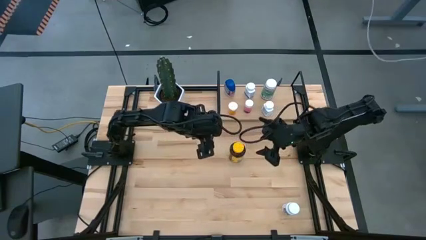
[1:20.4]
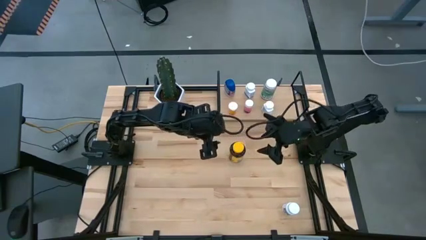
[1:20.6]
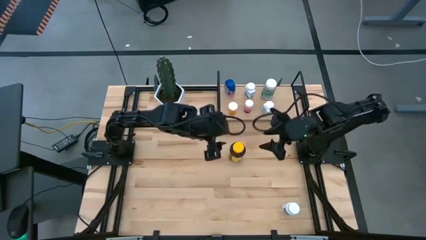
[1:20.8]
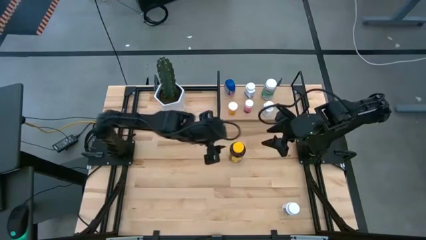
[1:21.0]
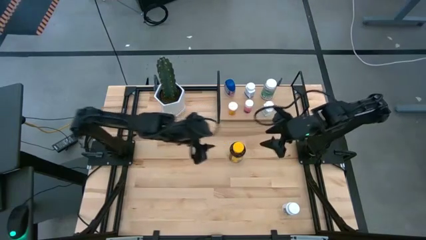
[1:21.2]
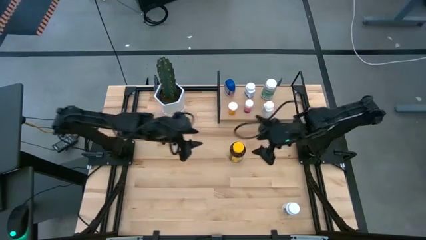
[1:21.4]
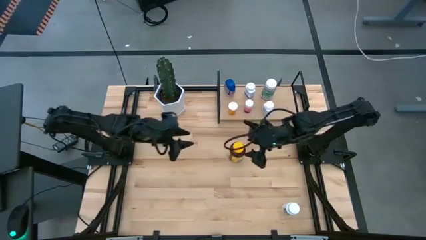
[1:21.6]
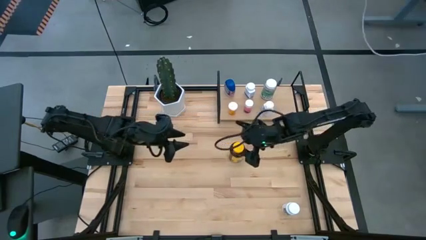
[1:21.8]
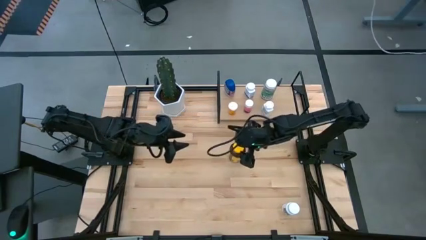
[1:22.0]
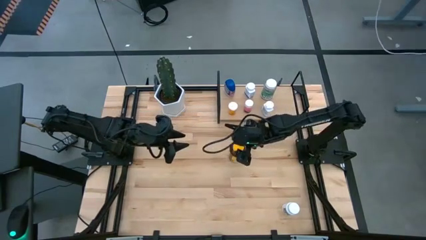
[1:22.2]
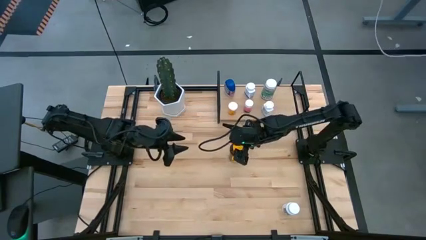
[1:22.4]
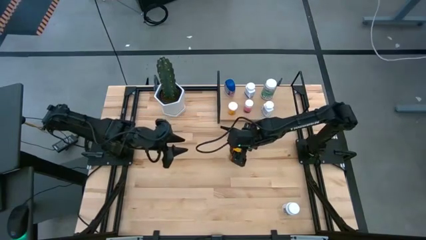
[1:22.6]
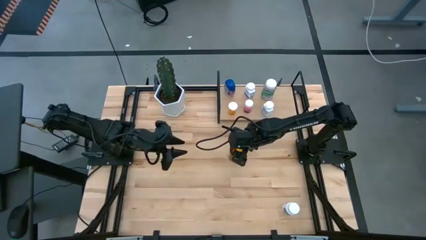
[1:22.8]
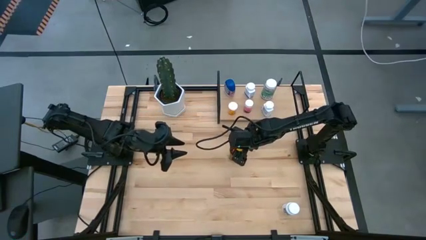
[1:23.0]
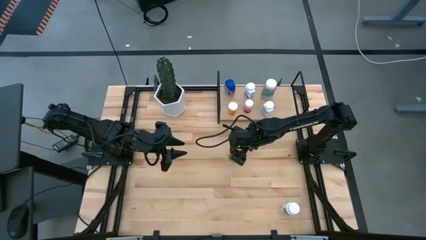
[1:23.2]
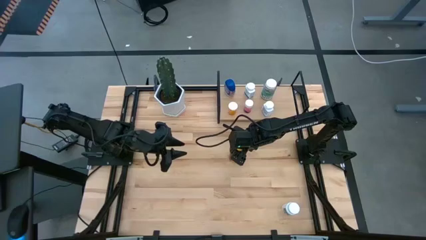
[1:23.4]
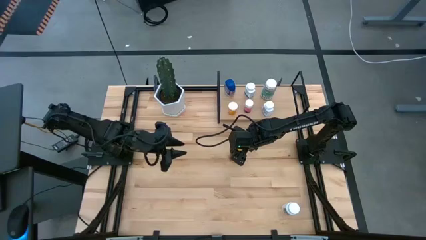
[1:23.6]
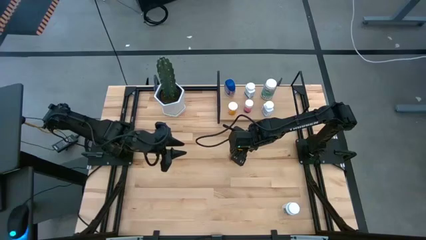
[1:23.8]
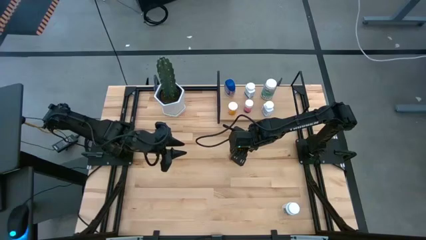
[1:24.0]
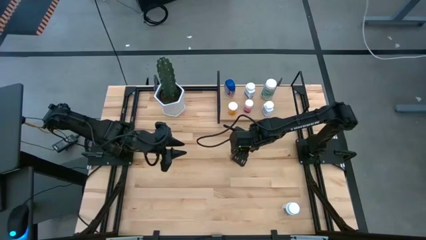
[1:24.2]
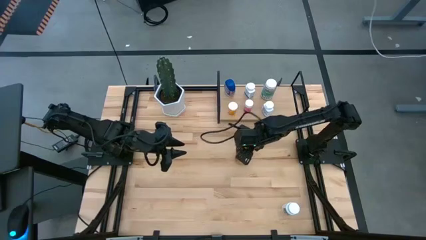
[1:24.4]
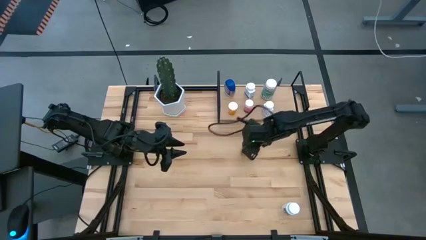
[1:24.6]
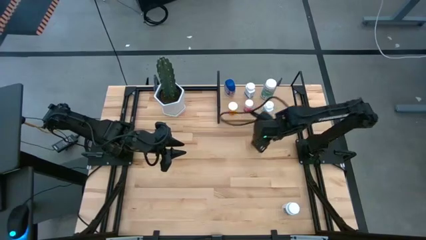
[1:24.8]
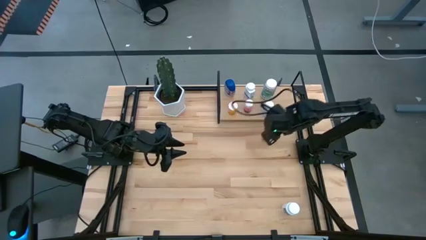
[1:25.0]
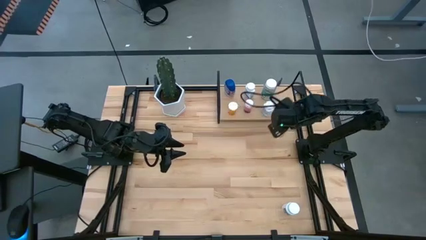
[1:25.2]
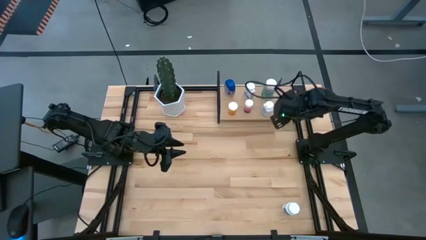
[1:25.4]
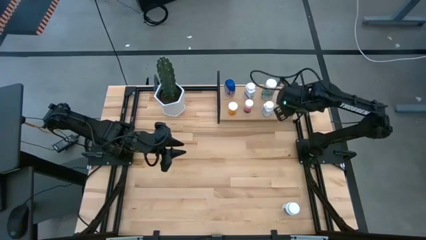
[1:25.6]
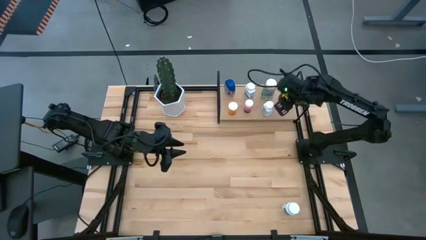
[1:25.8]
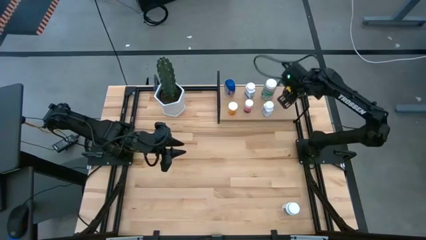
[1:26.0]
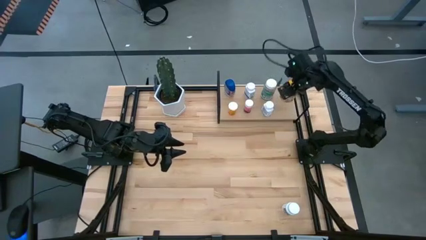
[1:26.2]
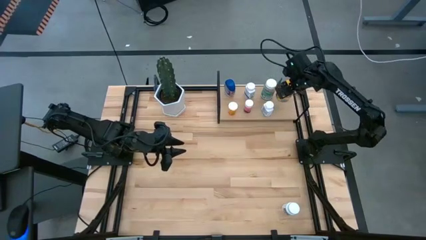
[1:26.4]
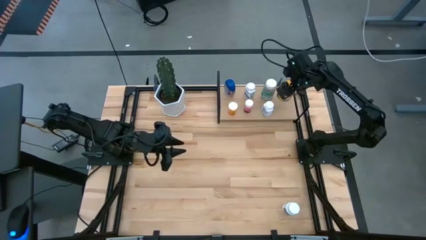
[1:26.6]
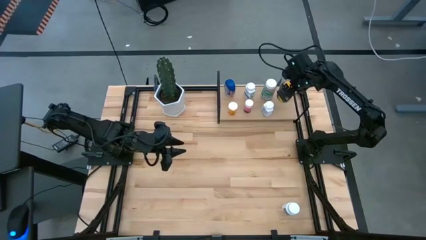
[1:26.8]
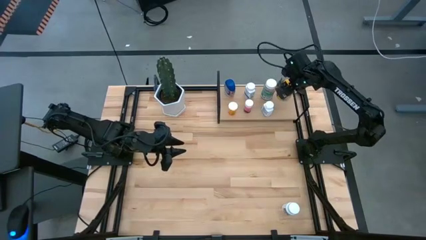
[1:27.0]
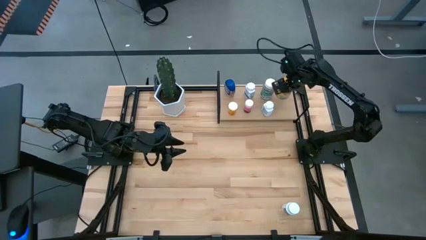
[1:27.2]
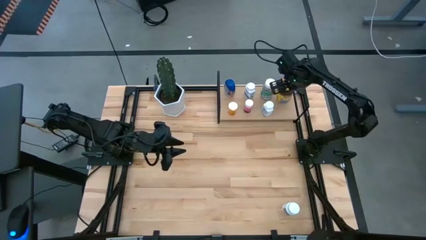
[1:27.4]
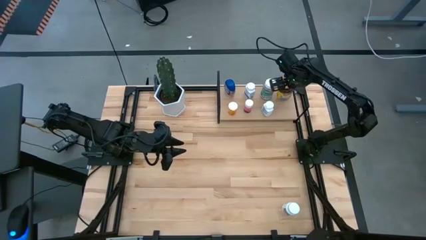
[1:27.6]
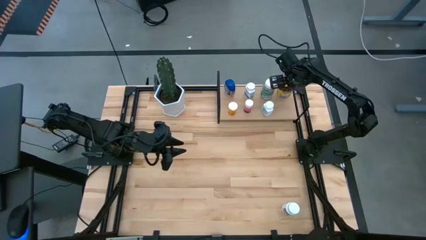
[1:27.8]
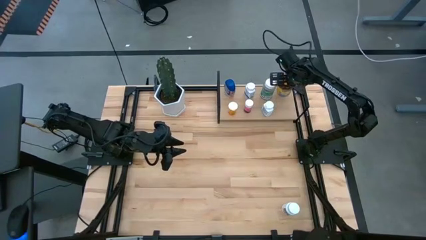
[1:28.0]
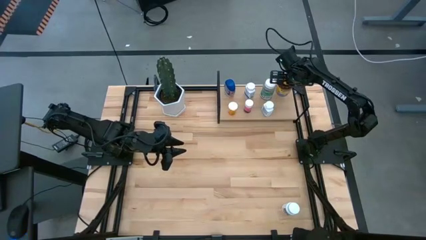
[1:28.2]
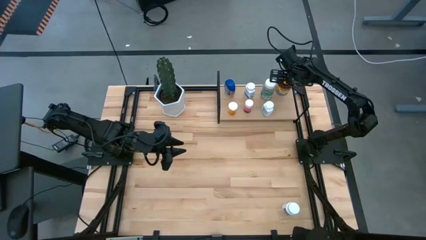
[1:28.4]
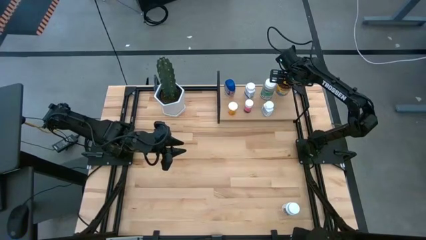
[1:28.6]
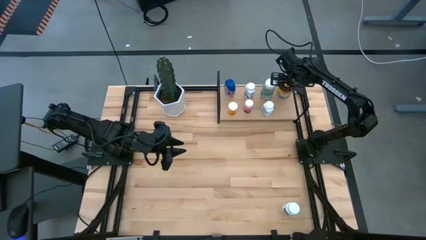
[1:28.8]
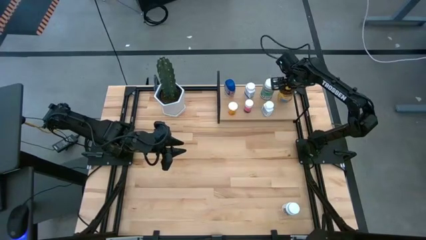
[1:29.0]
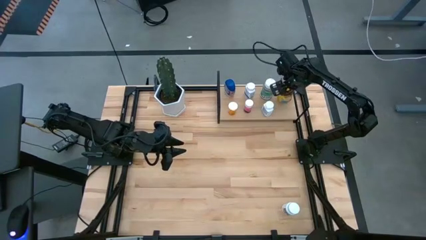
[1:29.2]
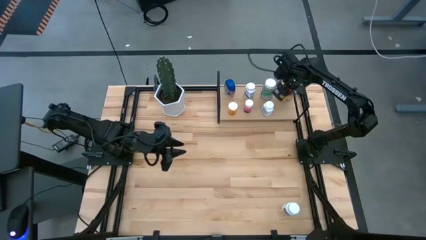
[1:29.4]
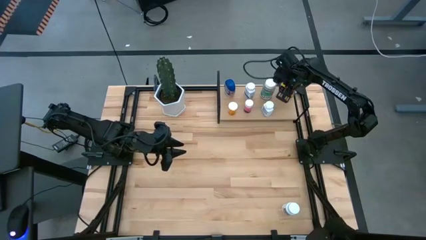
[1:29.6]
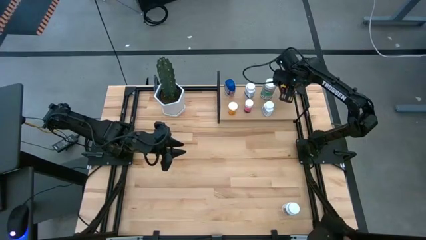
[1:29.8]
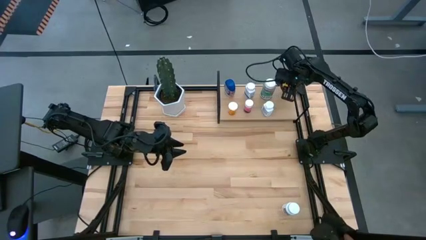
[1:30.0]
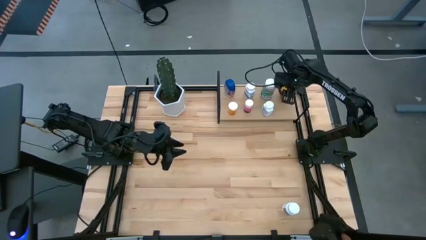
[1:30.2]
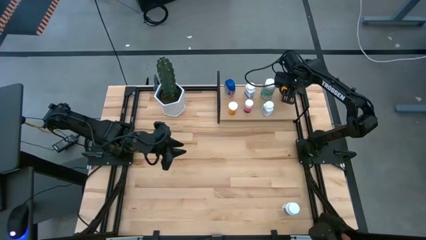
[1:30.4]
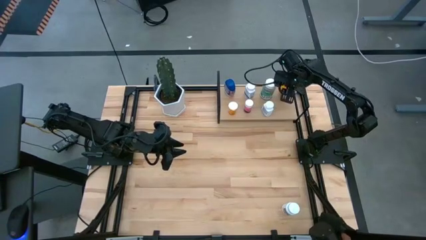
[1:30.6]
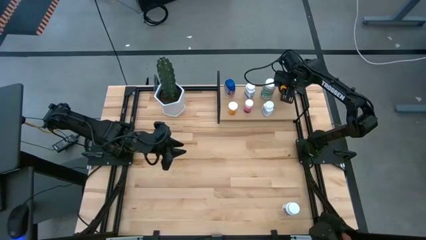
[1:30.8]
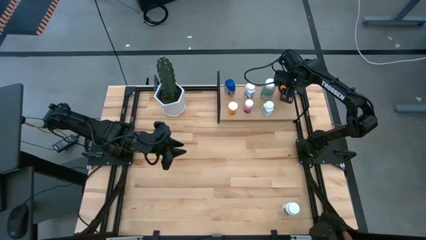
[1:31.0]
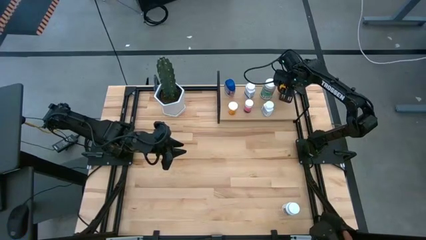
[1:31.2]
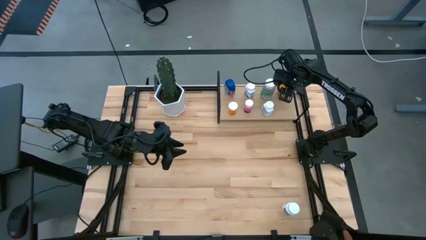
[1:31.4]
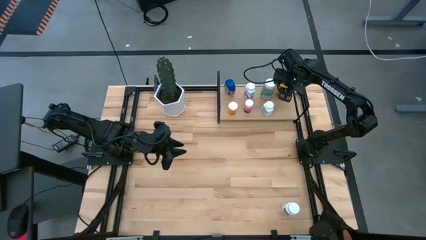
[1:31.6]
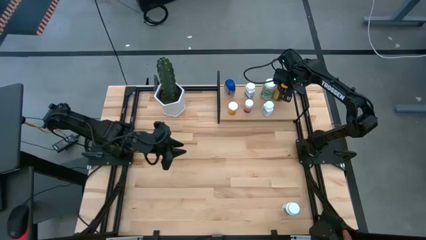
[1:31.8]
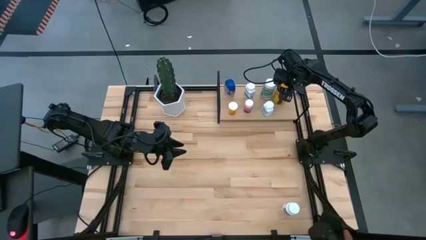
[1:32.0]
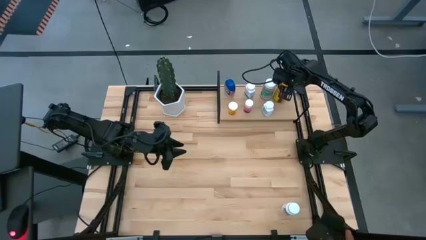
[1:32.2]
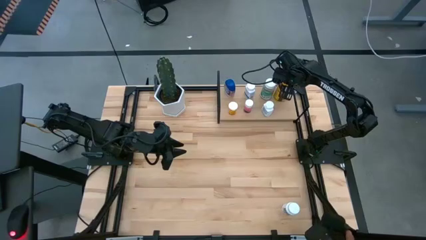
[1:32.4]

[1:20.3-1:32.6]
Task: Pick and place medicine bottles onto shelf by color
Put the yellow pill bottle on the shelf

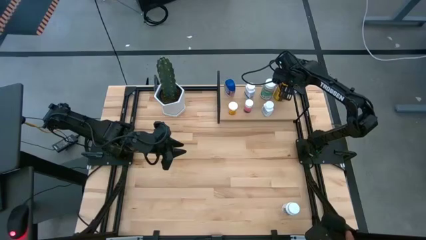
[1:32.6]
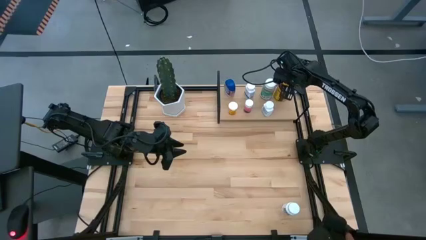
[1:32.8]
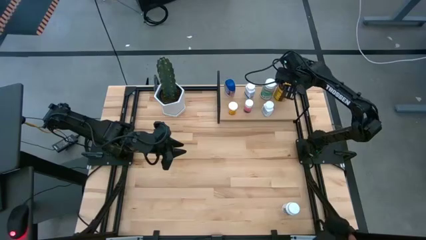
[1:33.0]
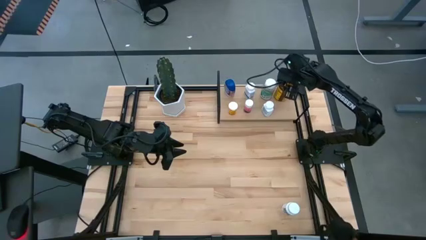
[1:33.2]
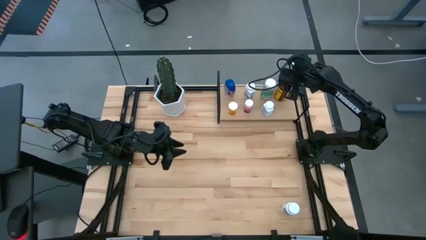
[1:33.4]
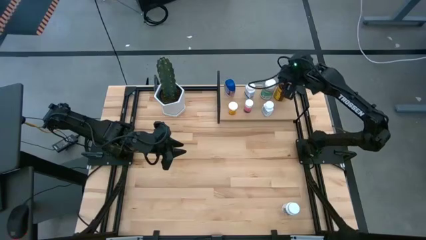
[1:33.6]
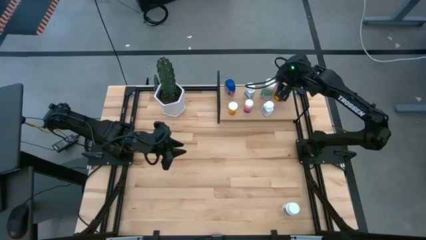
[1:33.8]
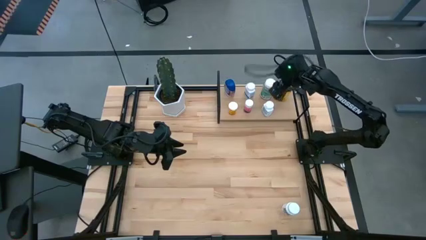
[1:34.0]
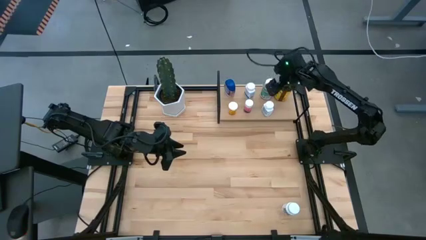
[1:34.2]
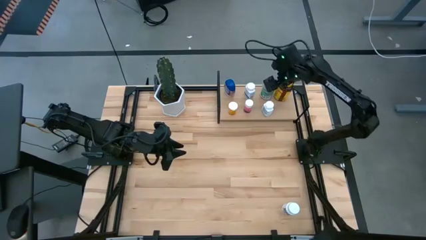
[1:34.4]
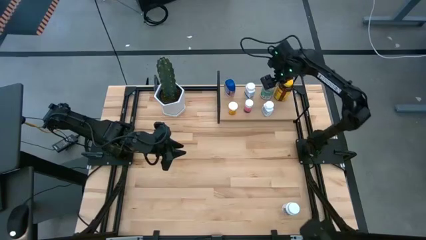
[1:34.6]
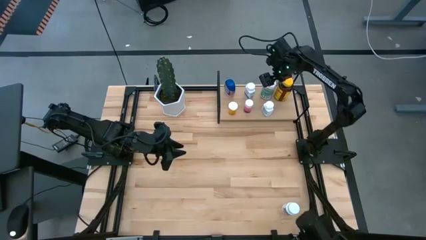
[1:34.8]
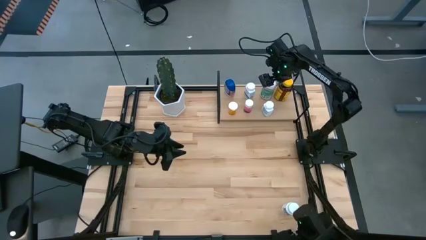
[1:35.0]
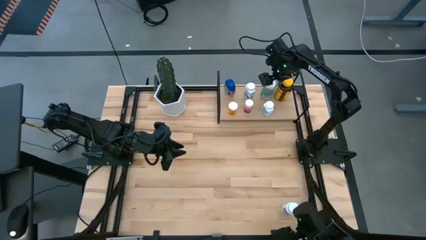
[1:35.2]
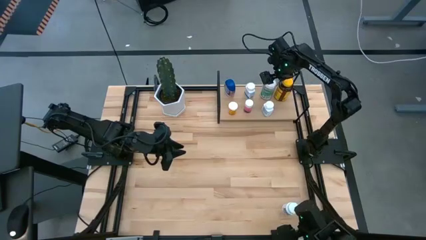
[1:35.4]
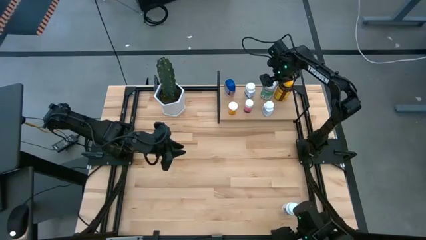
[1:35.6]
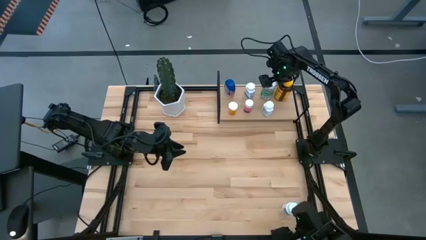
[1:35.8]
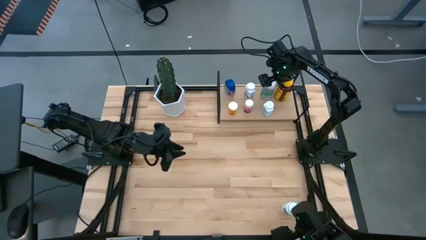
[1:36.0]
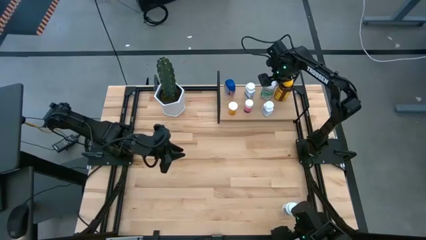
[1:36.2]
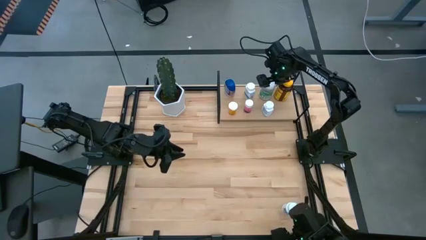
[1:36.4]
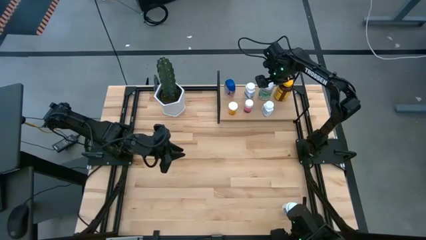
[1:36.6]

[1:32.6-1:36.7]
Adjust the green pill bottle on the shelf
